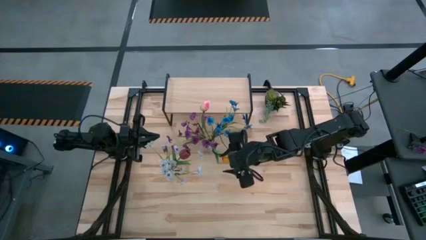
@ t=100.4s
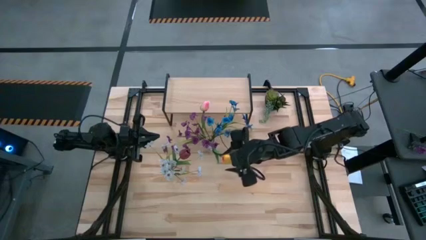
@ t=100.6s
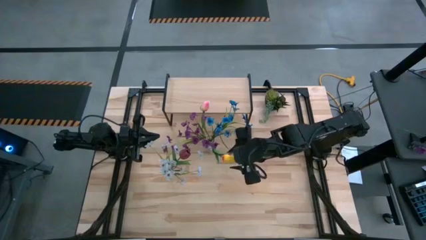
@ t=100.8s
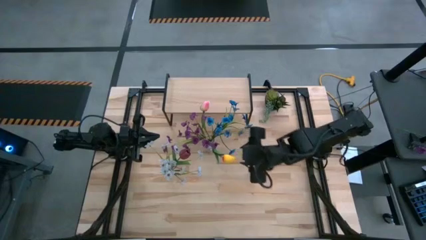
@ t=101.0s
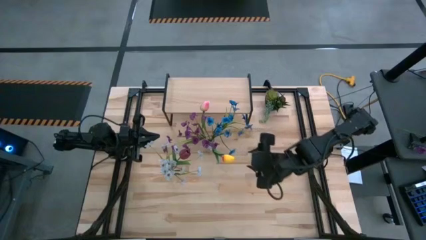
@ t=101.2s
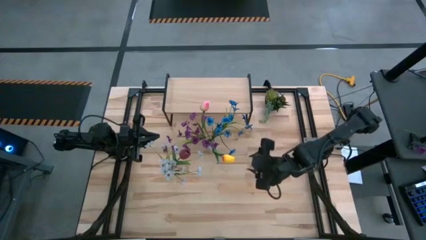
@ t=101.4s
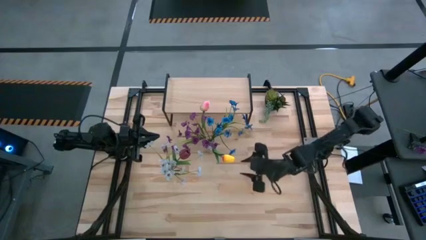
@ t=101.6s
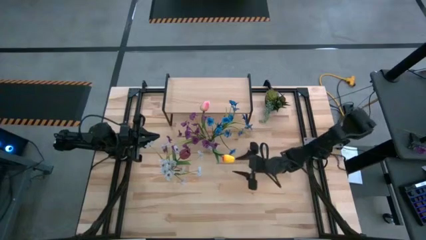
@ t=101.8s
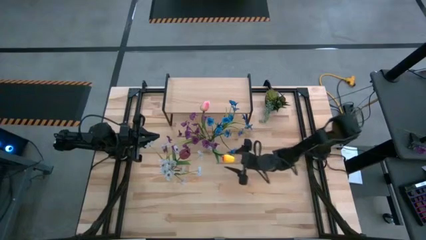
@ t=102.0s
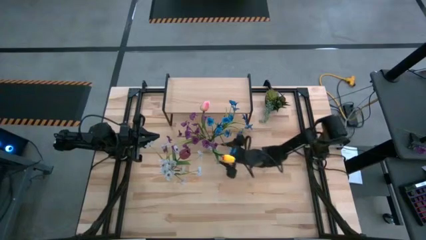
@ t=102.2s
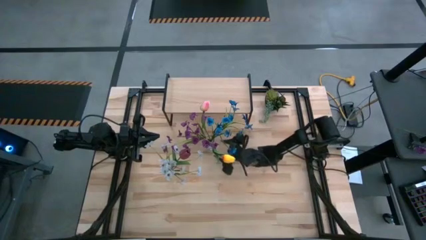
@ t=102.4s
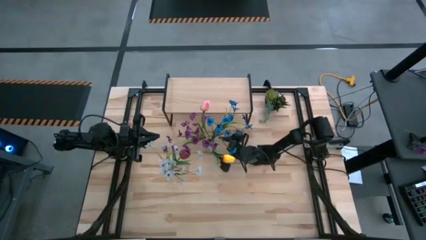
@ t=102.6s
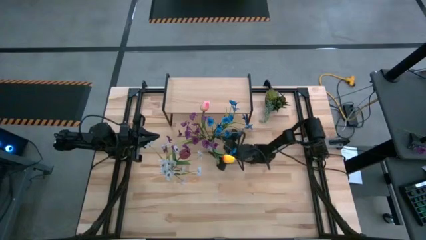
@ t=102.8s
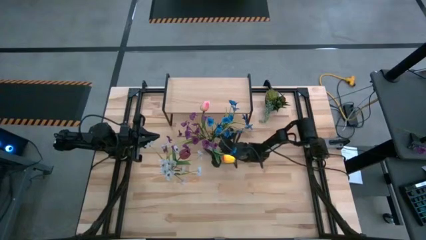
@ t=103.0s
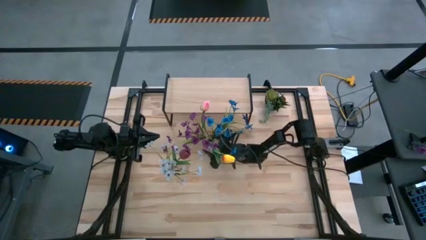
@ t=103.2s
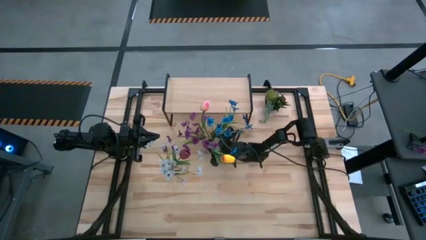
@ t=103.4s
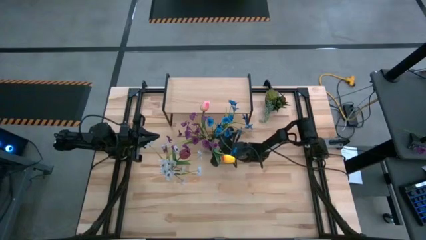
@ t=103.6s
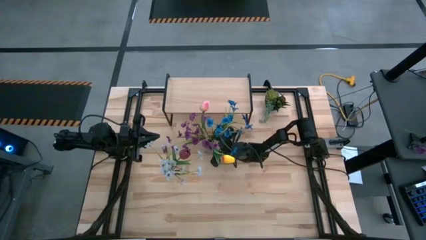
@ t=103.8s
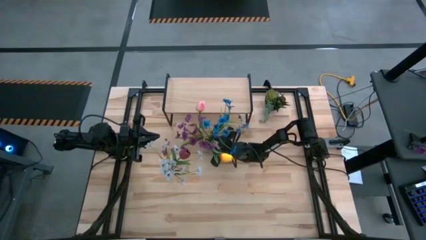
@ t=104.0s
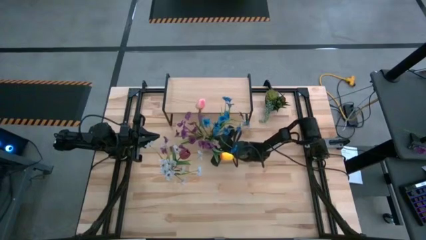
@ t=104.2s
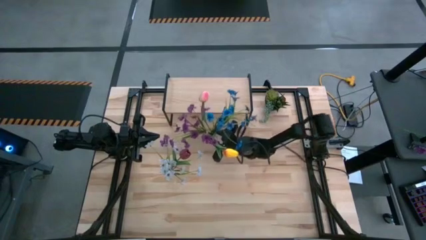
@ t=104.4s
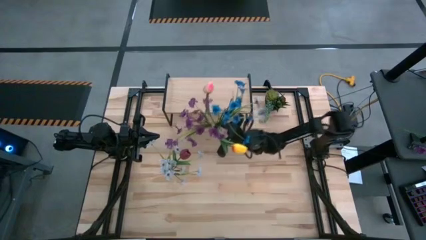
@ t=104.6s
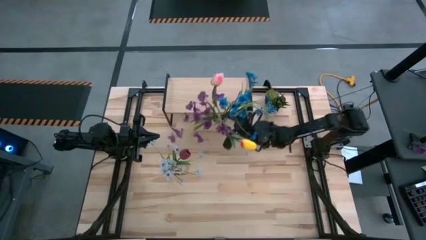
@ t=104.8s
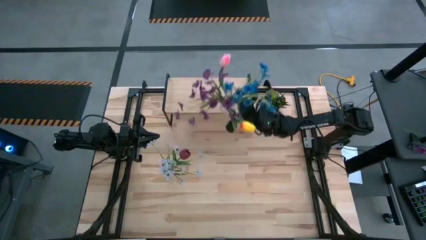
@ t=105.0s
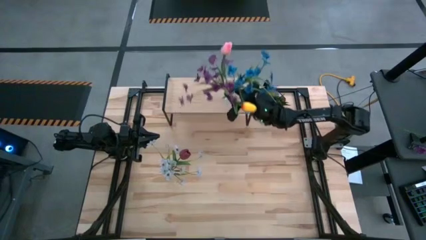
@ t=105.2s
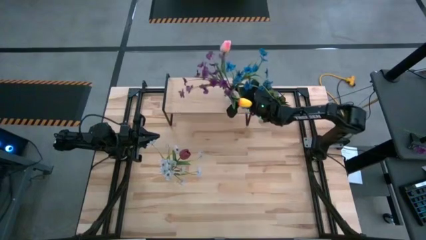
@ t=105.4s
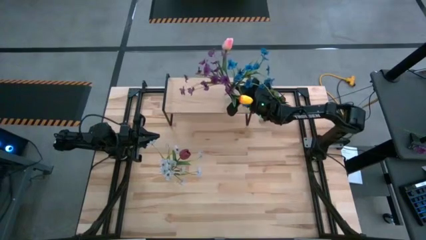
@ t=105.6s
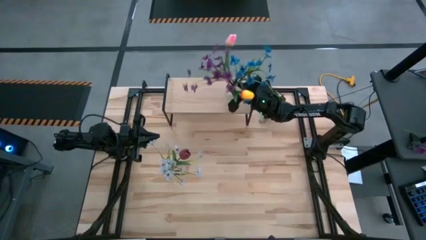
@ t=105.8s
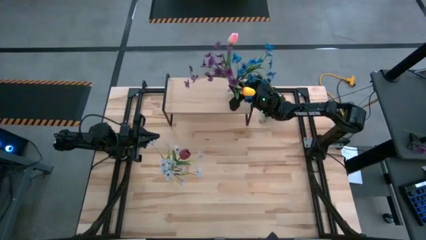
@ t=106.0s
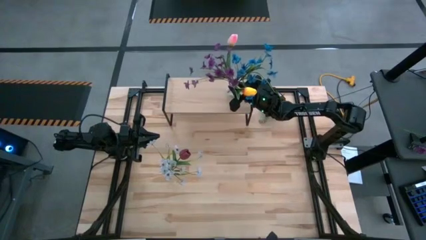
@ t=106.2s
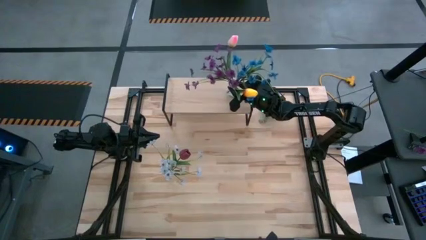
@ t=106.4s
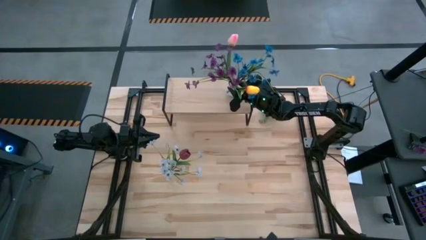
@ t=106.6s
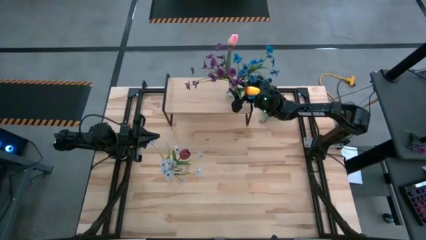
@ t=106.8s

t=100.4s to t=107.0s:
Task: Pick and place flowers into a vace then onto a shelf
Put the right transparent vase with flowers on the shelf

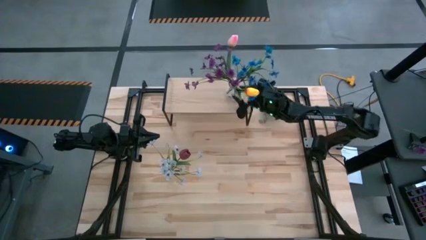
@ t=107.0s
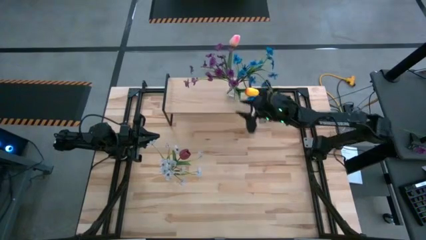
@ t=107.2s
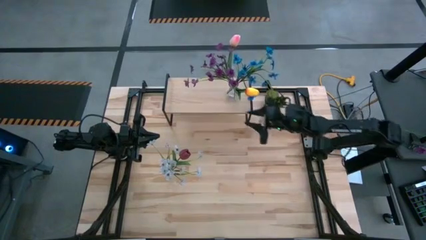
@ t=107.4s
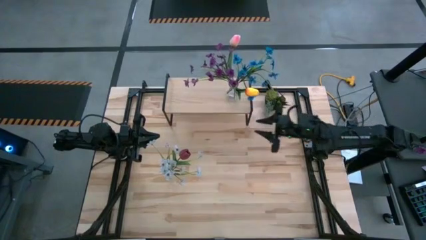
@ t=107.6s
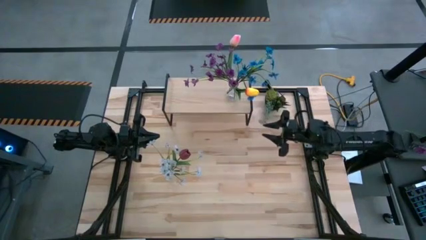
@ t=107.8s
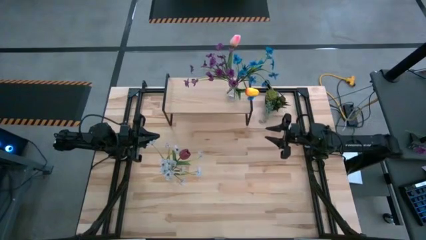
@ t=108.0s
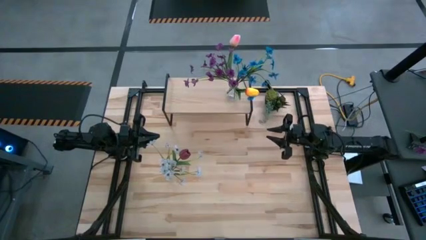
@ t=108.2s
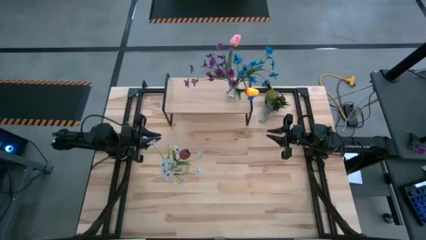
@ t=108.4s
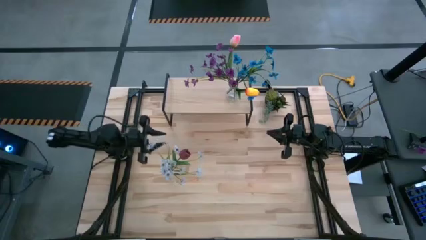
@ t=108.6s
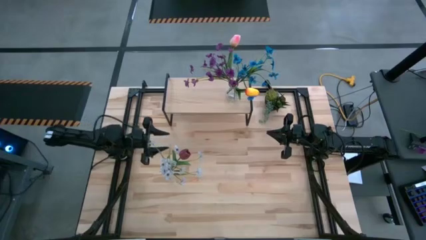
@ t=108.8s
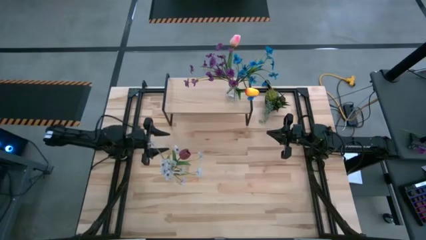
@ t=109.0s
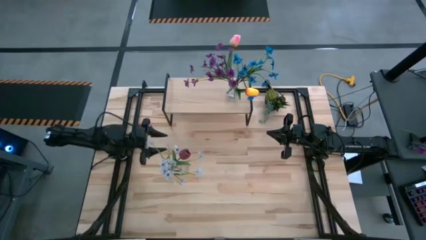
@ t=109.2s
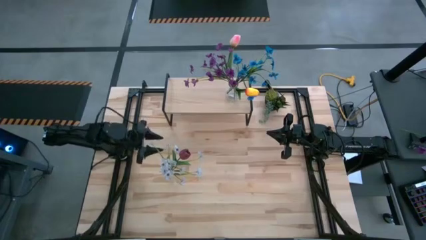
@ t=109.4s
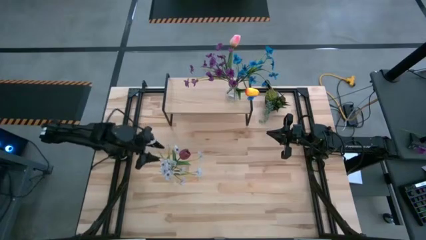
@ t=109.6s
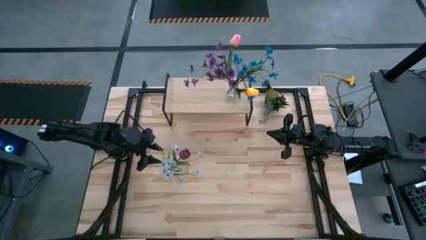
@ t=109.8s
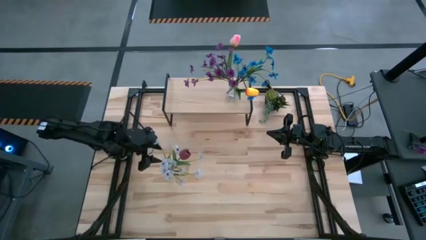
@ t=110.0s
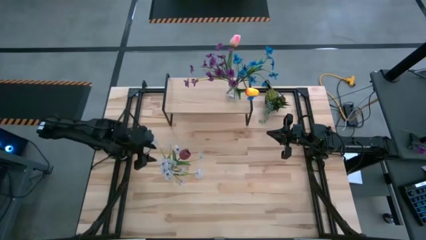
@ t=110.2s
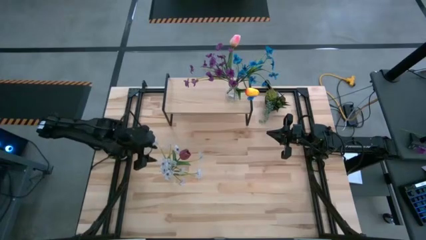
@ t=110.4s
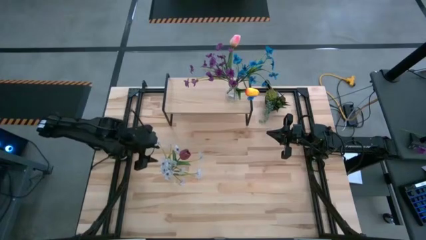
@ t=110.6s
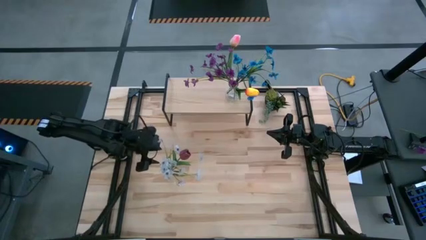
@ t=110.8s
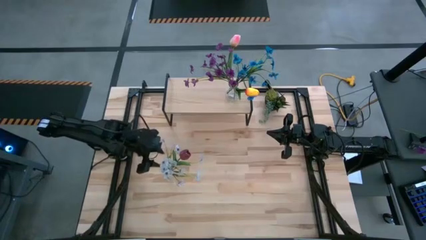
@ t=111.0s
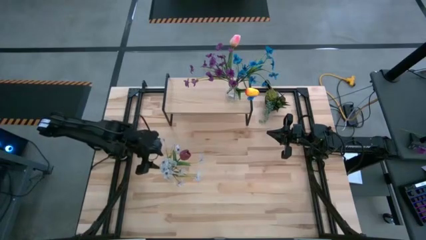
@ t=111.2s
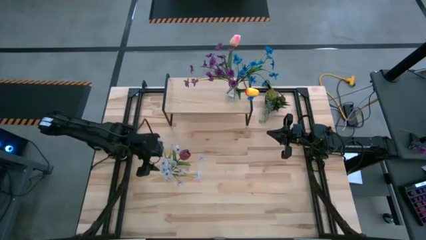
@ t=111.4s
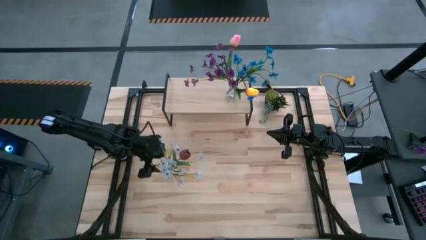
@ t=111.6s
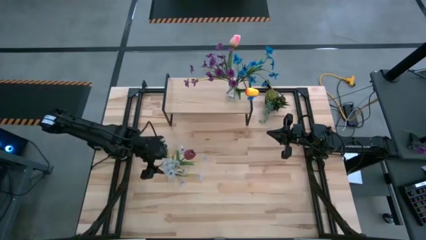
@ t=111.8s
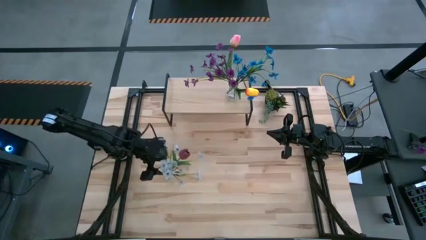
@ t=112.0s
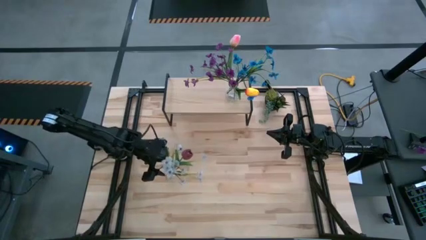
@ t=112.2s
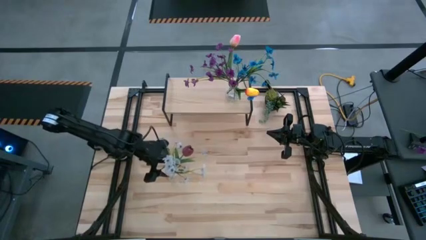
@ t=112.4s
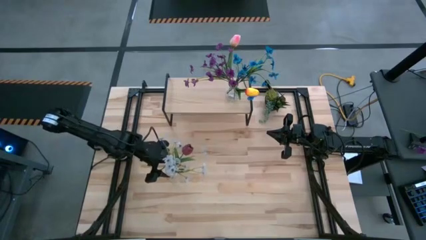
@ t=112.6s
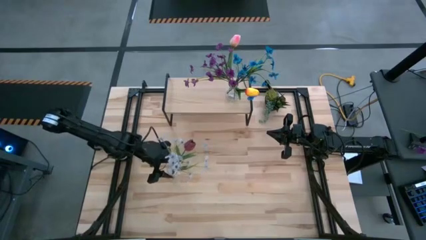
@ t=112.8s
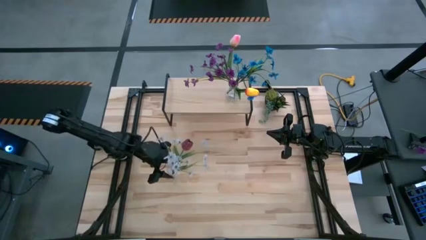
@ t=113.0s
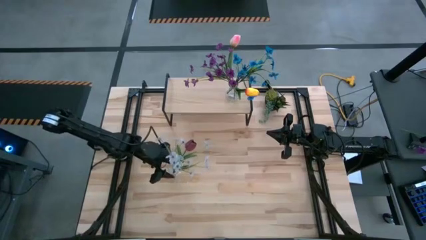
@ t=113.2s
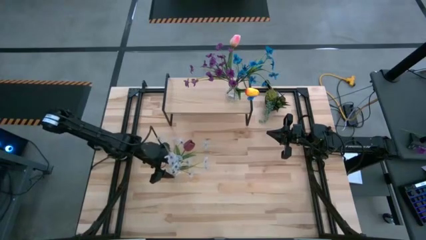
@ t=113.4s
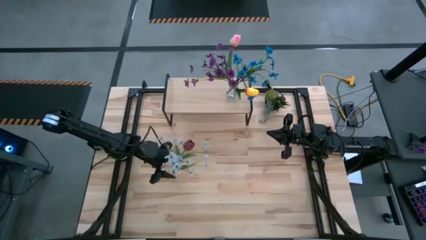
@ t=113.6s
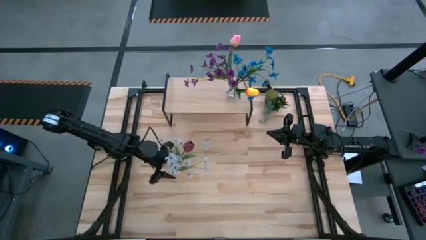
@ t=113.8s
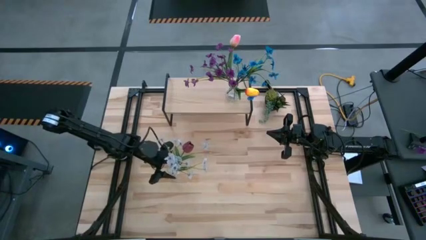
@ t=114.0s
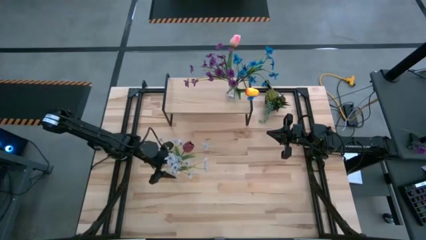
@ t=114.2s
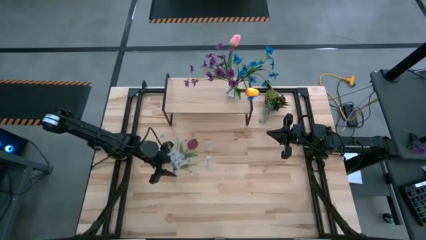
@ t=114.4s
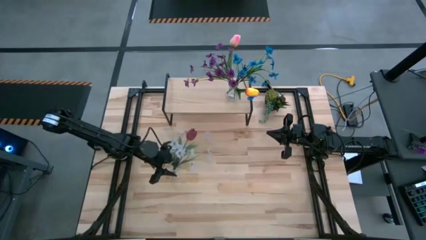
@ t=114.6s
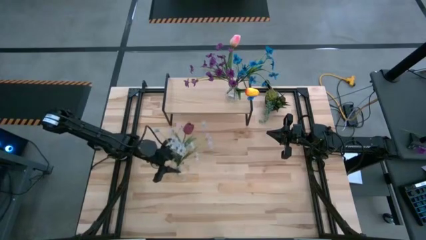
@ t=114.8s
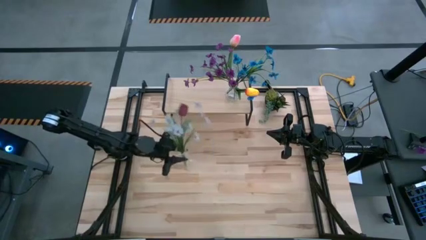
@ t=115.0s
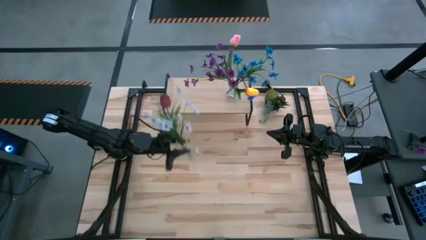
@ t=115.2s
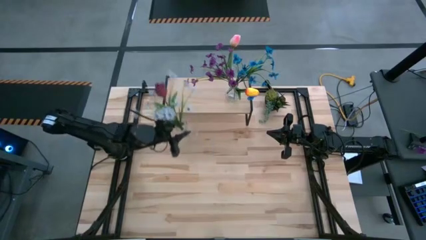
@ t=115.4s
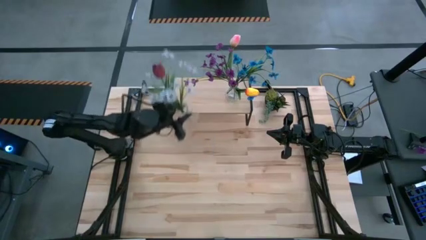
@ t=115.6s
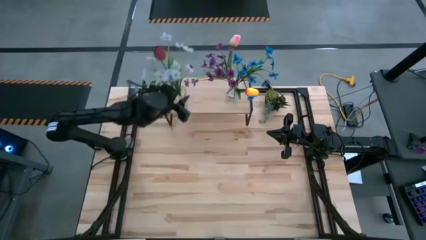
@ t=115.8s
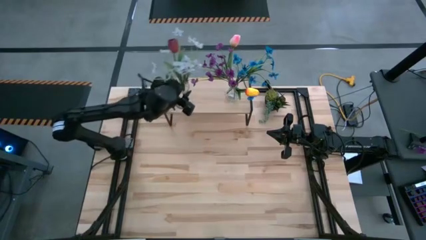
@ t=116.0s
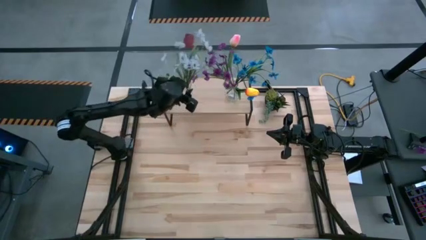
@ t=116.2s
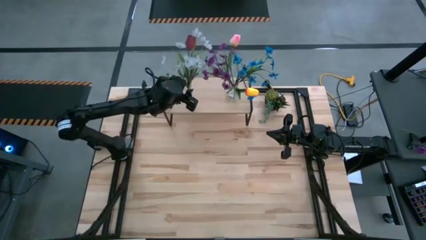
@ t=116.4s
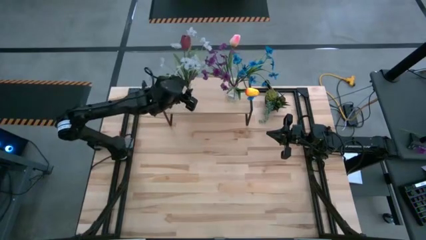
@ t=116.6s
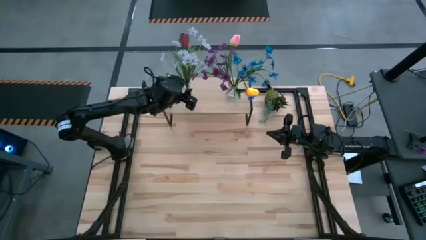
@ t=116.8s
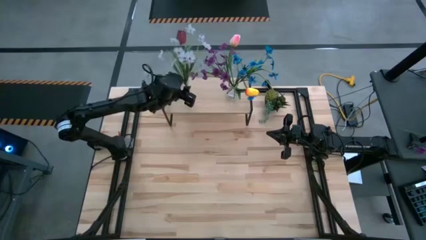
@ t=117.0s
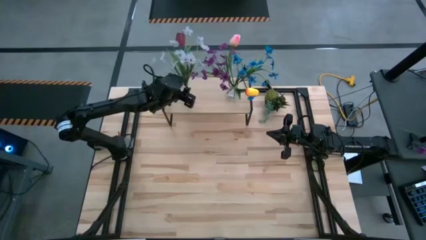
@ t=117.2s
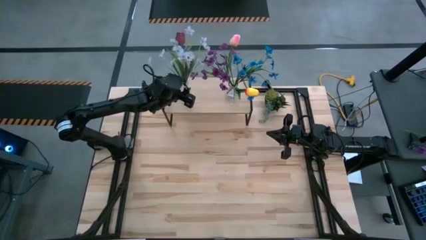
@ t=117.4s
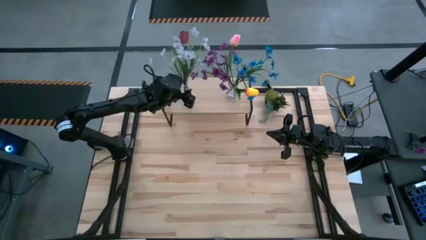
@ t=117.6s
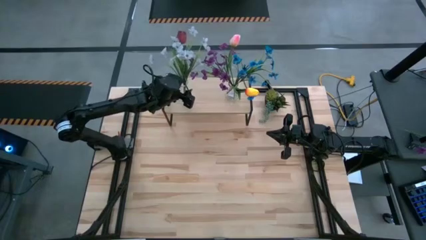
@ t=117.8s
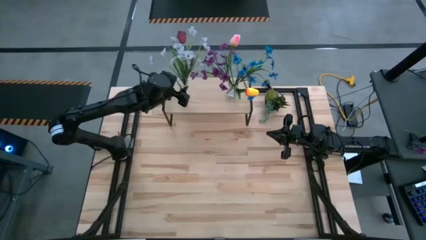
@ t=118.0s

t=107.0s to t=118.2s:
Put the transparent vase with flowers on the shelf
